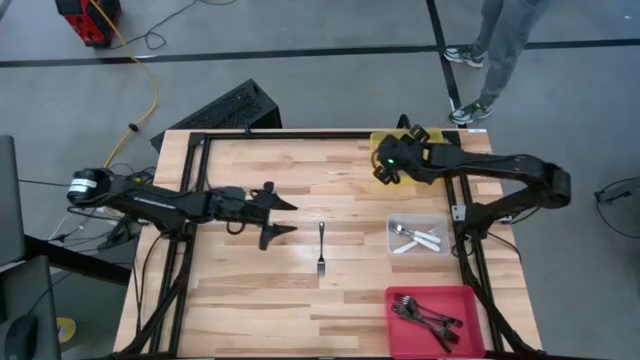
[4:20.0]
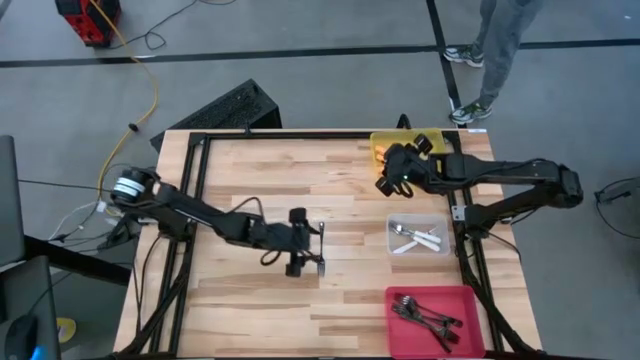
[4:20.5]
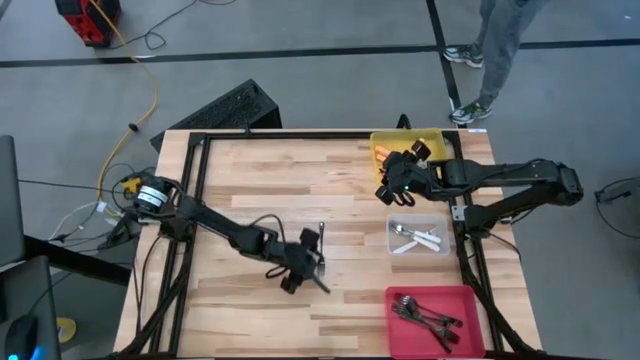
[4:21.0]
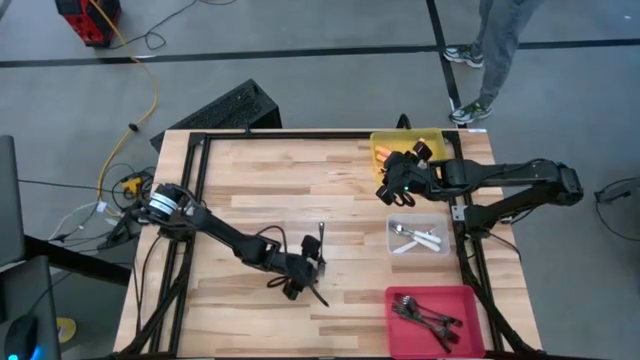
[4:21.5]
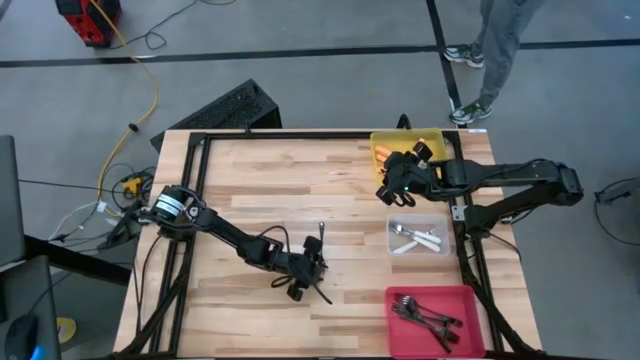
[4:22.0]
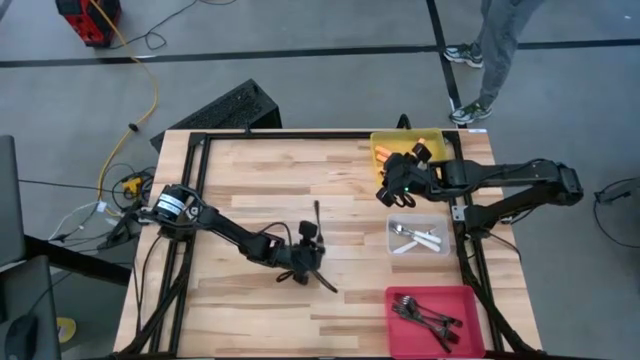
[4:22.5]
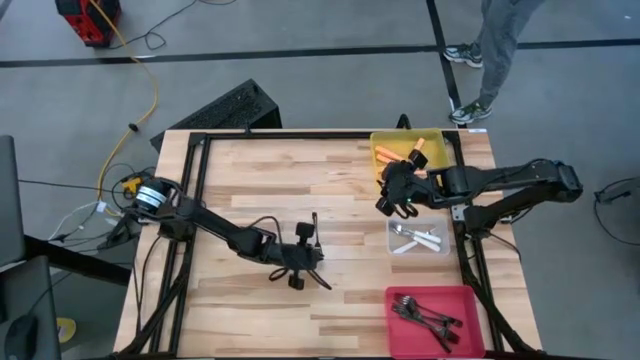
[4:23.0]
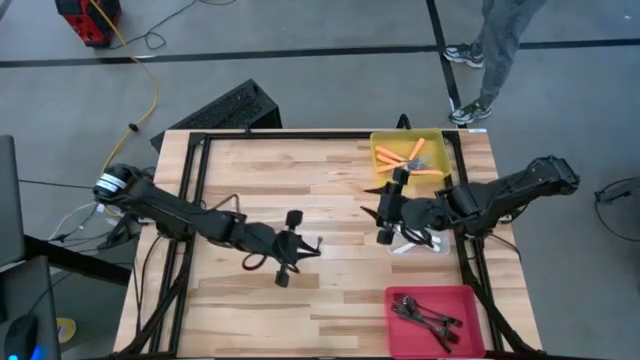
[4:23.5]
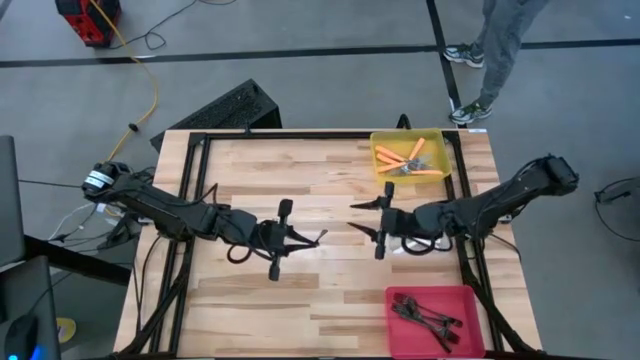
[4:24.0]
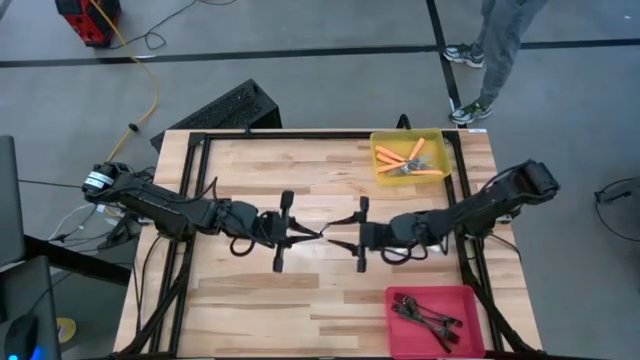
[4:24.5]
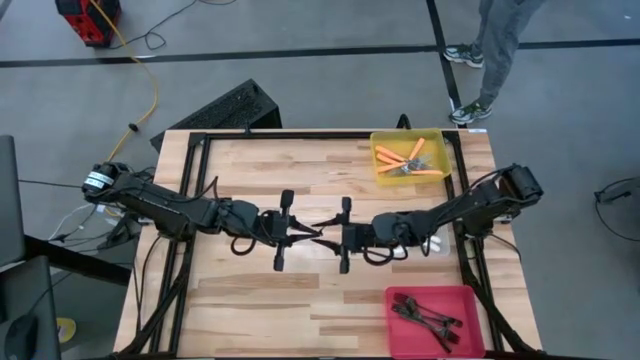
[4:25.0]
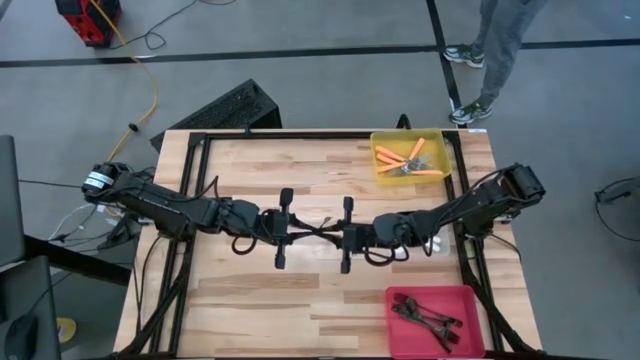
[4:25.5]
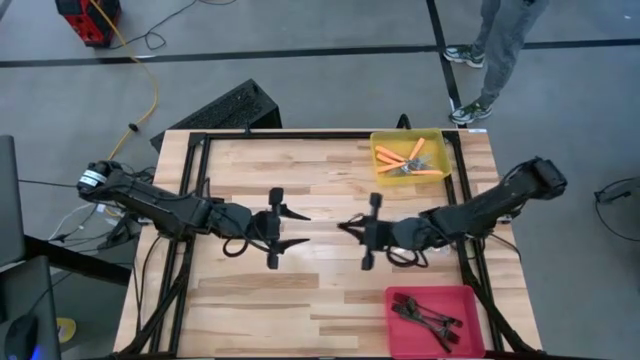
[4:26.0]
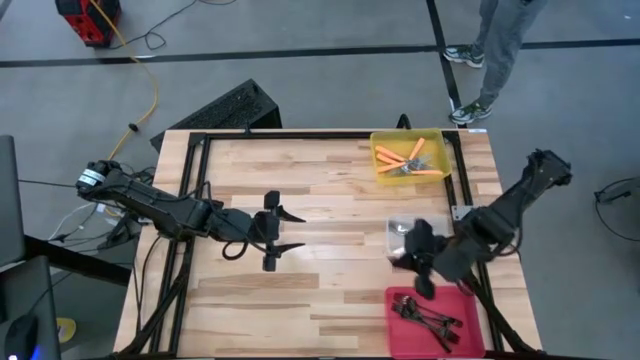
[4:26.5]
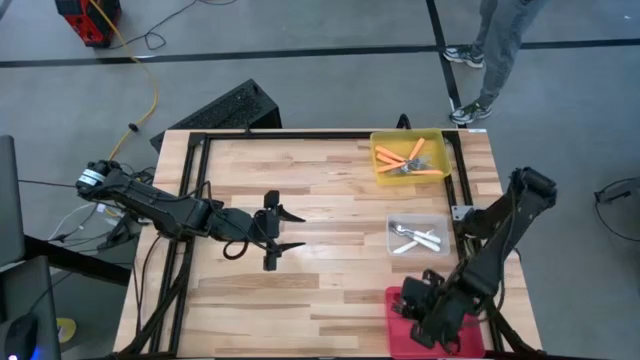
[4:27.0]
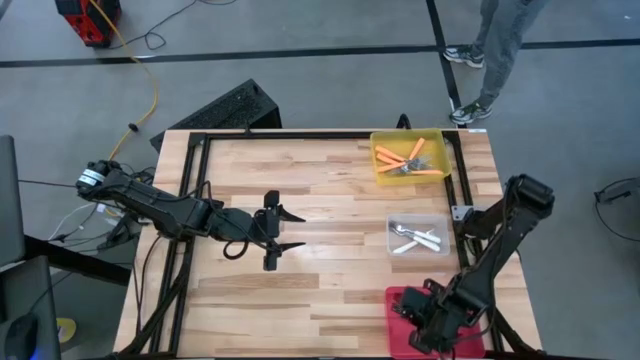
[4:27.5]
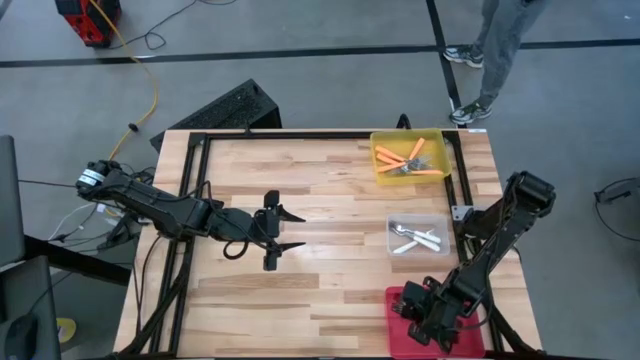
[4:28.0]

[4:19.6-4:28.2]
Task: Sort silverware by color (type)
Put the black fork into the red bin

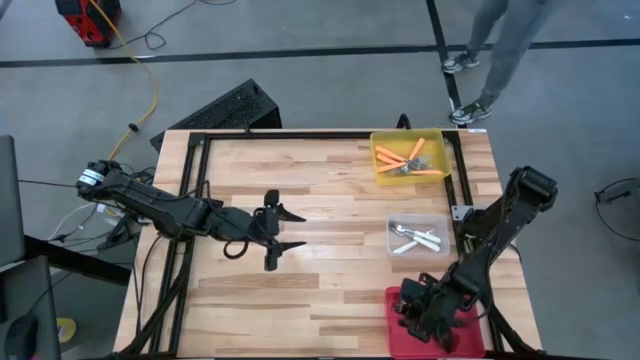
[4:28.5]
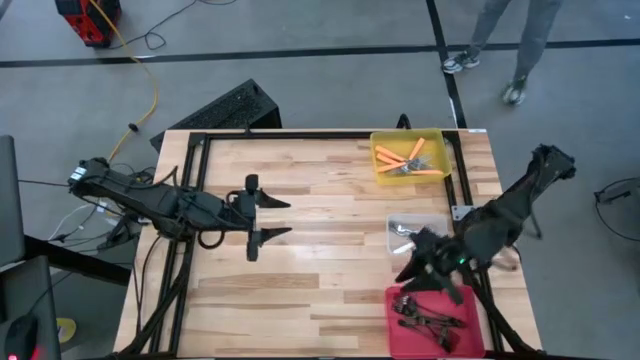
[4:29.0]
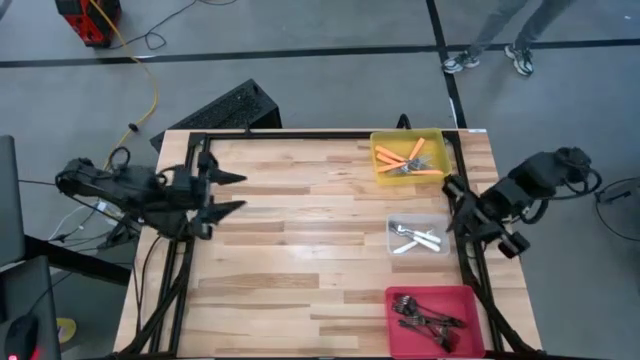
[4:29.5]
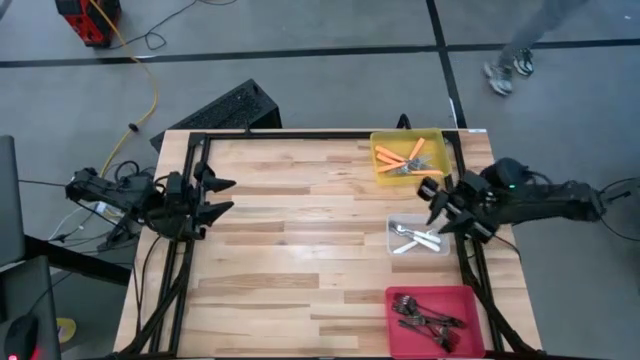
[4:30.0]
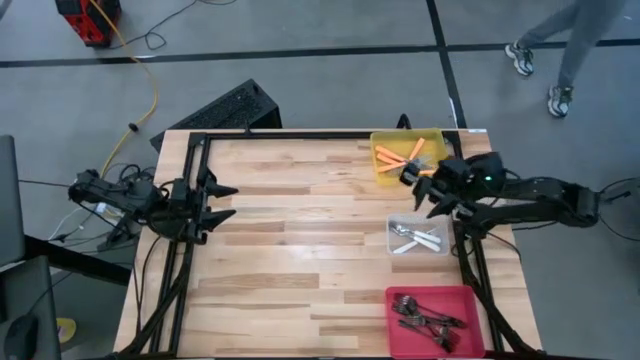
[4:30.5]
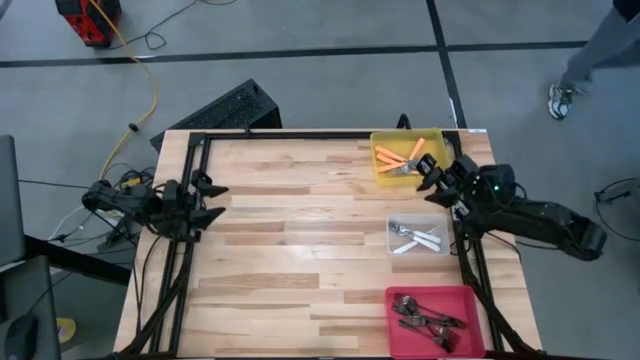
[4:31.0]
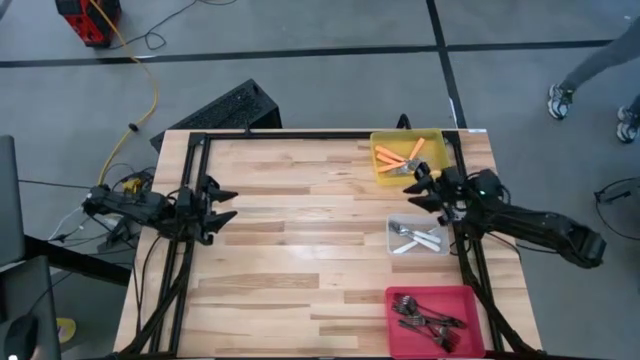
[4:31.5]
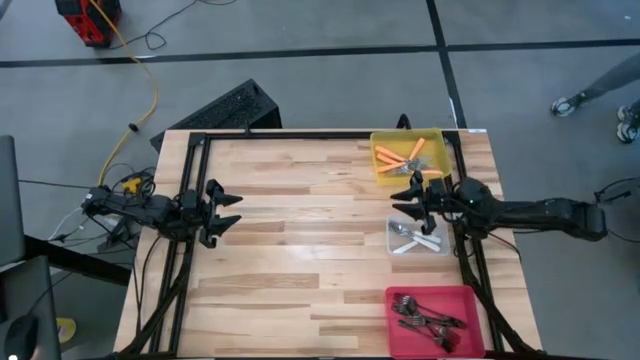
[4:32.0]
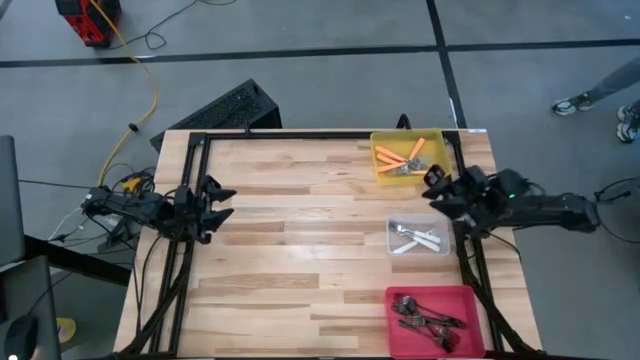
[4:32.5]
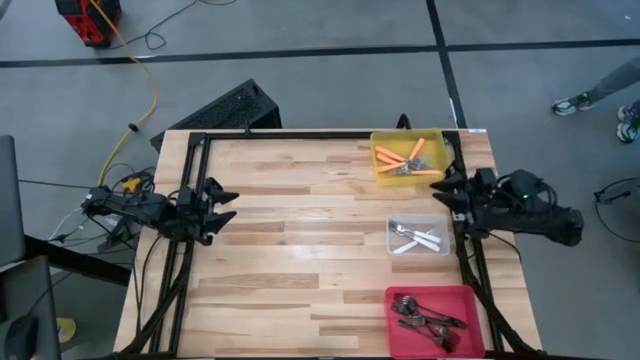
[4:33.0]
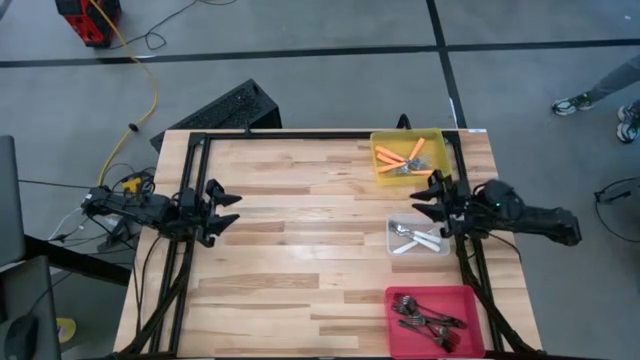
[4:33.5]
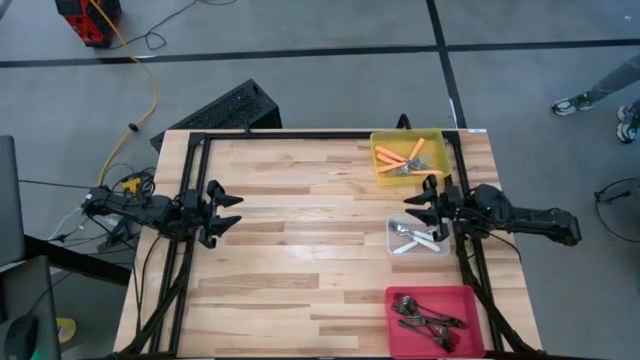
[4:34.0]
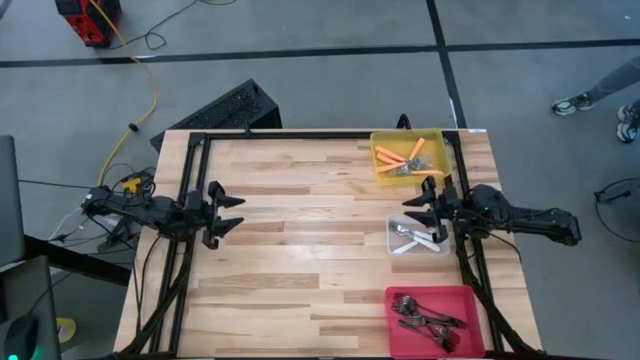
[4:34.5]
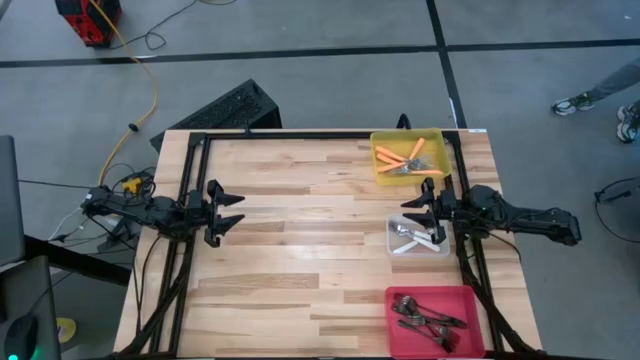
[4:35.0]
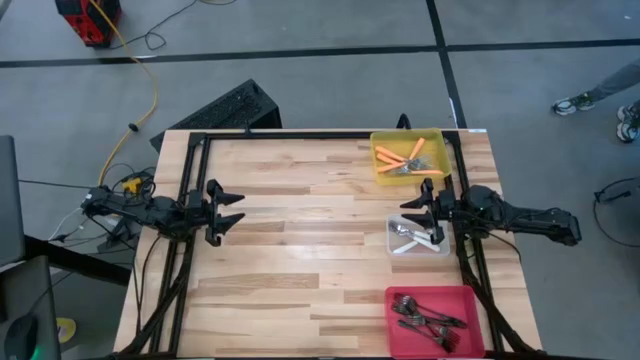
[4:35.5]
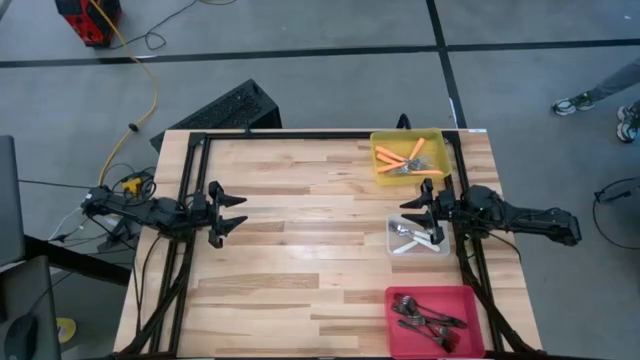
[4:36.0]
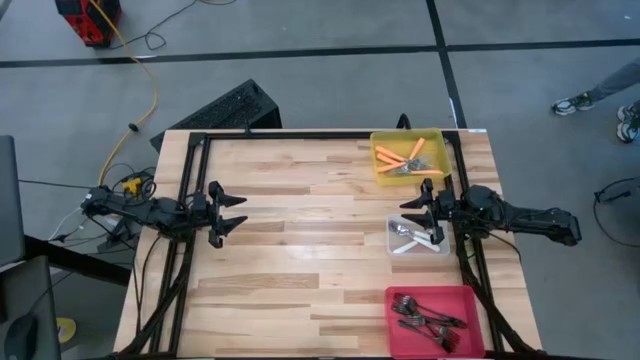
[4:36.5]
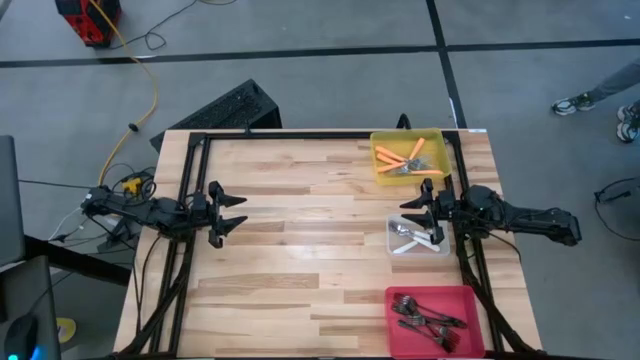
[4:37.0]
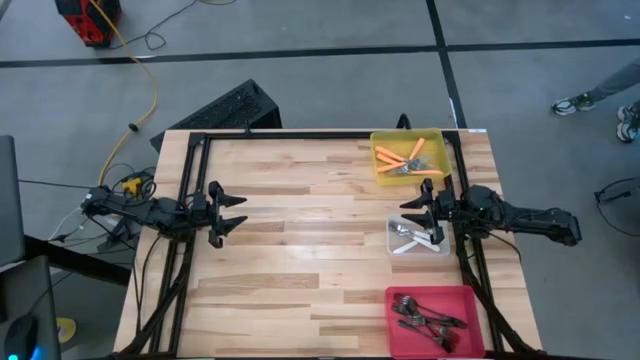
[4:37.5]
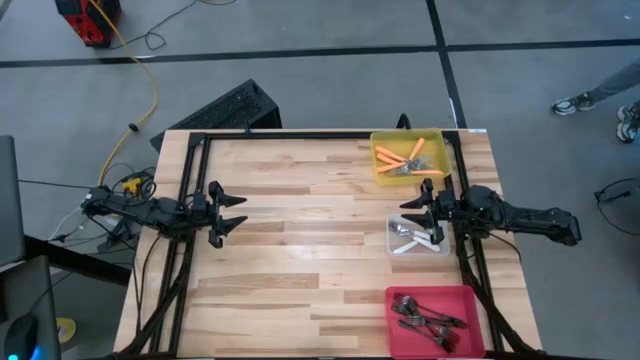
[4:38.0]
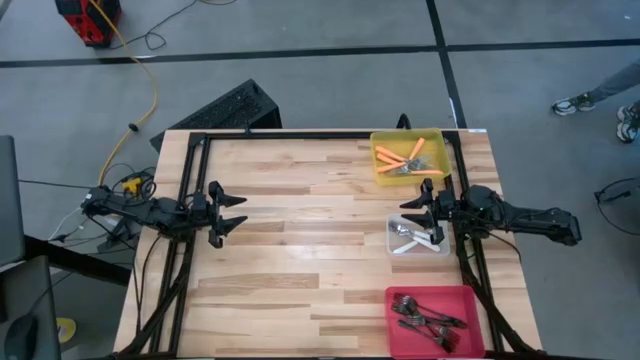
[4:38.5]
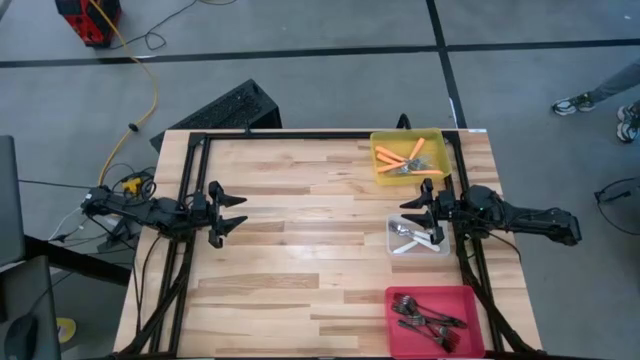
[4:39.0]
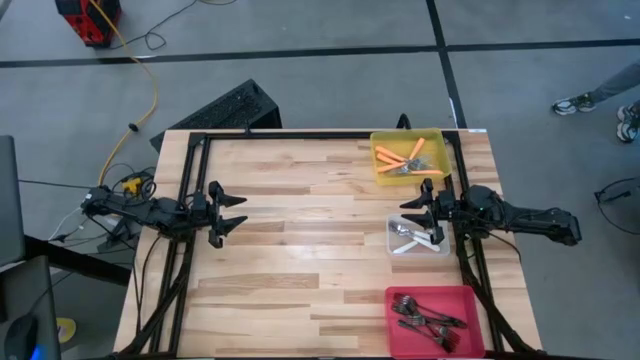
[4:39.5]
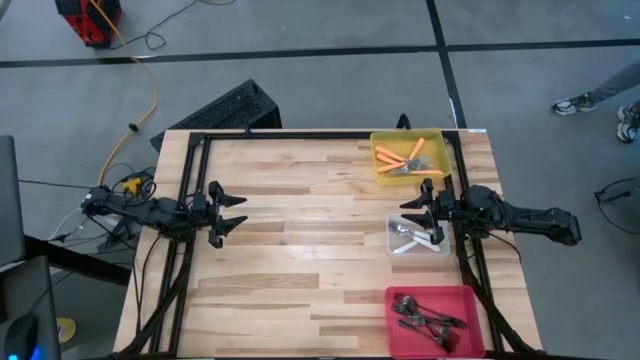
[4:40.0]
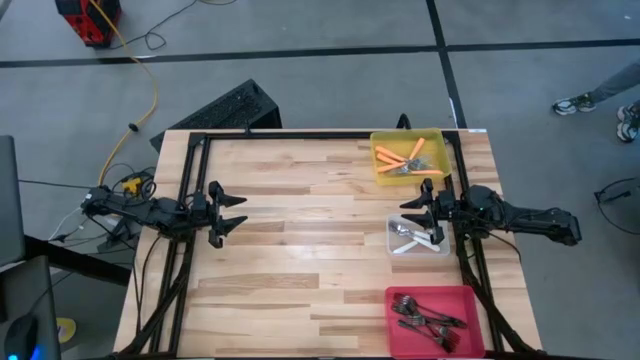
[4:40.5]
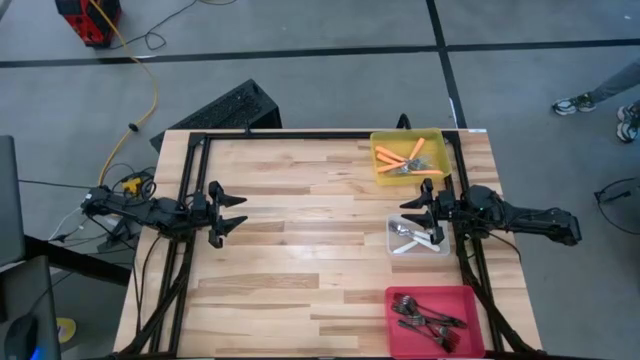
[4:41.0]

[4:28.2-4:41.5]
Return to Home Position
